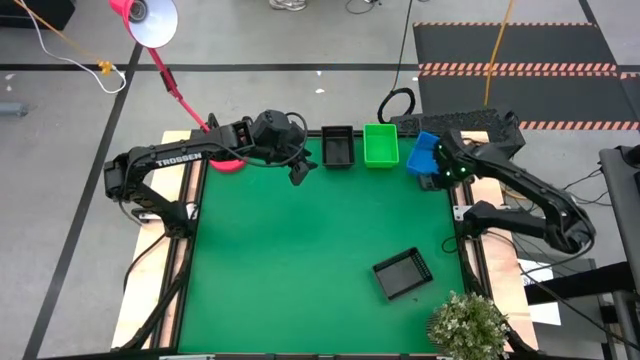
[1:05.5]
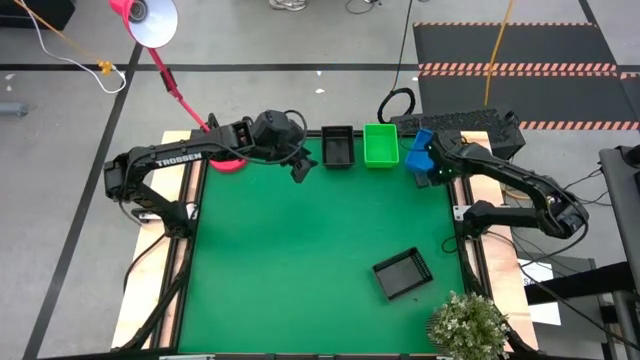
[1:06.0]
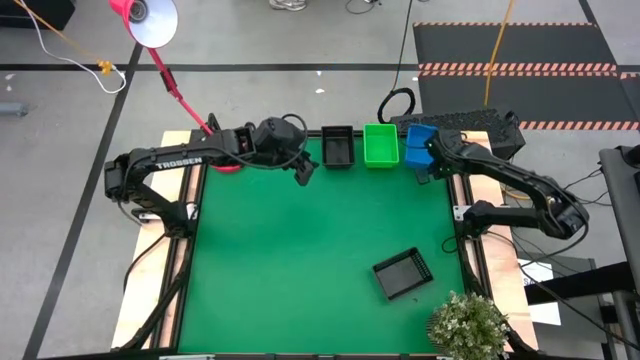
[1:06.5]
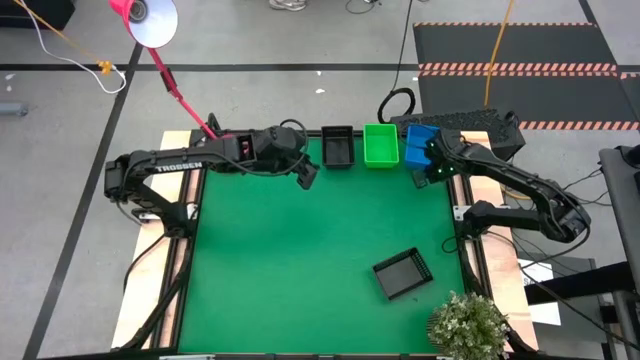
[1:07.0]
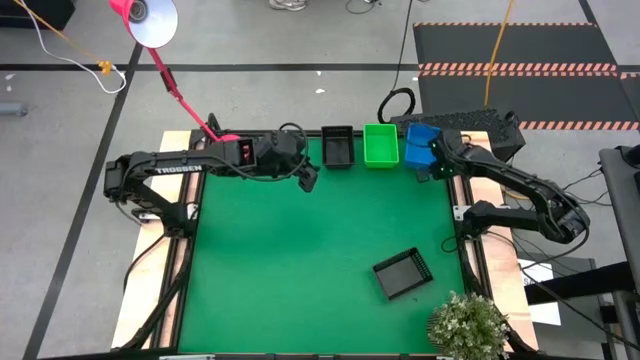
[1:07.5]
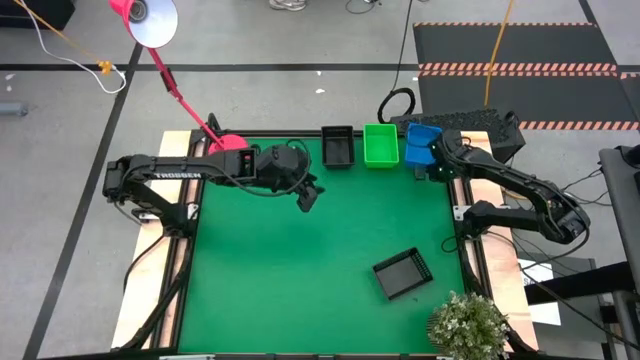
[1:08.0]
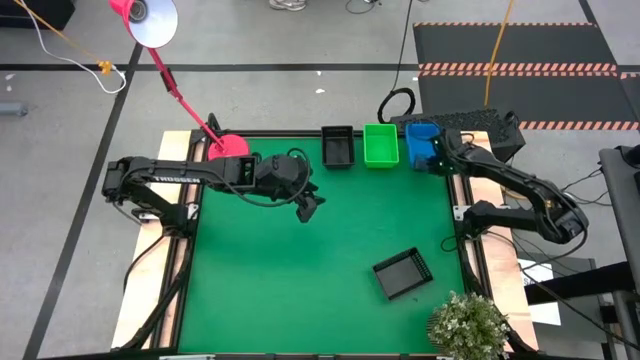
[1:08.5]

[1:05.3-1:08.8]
Adjust the stacked blue bins

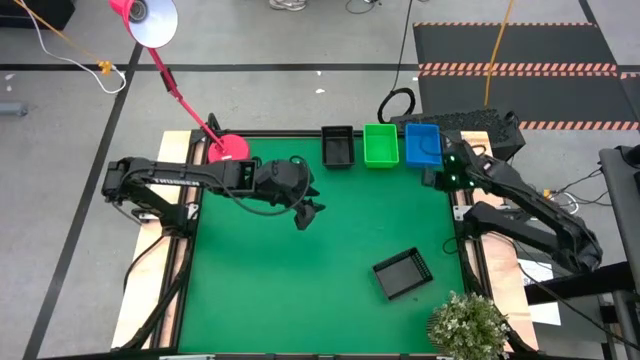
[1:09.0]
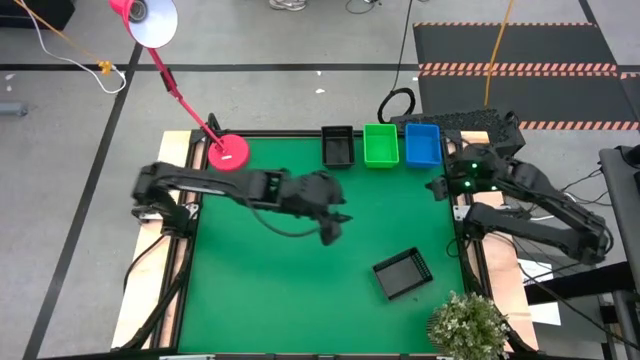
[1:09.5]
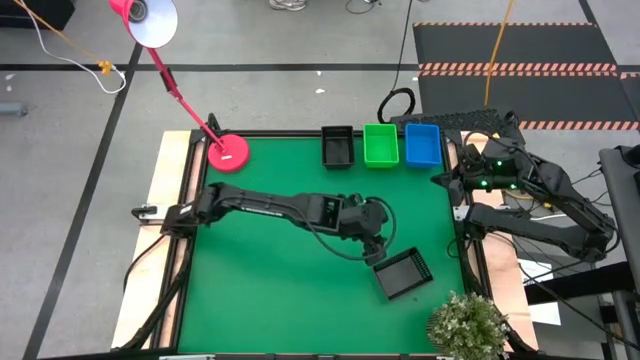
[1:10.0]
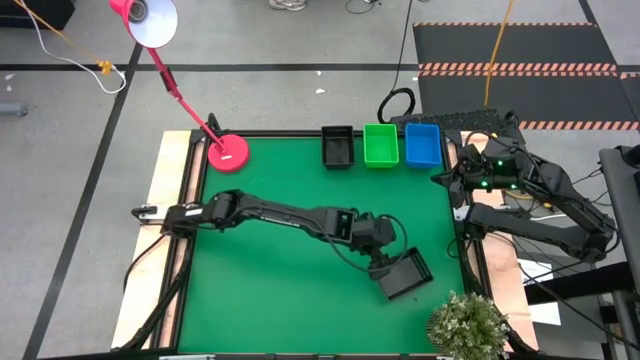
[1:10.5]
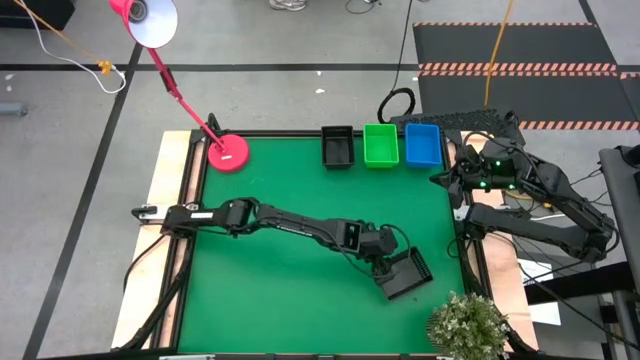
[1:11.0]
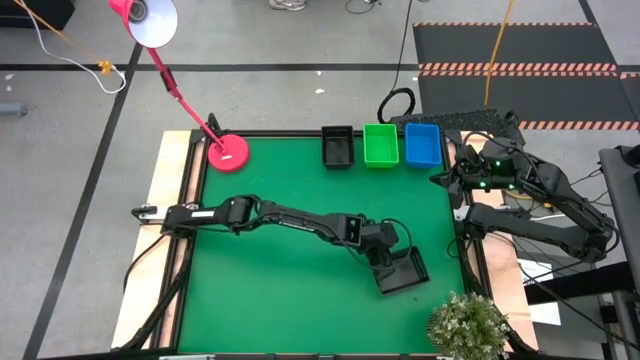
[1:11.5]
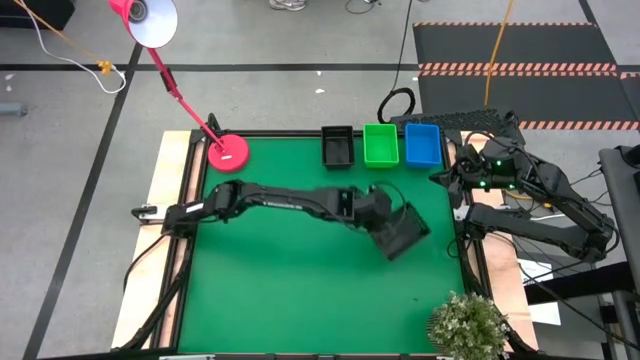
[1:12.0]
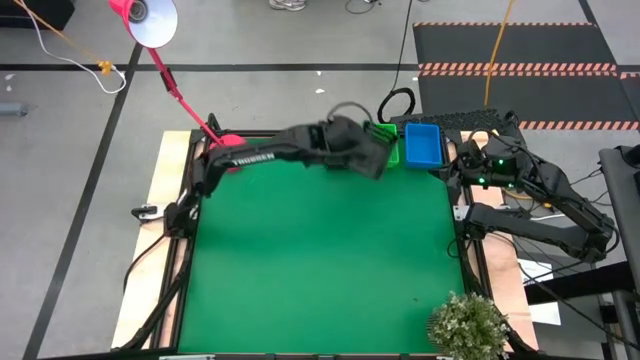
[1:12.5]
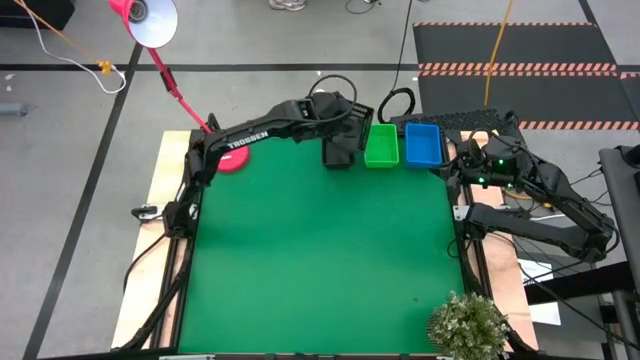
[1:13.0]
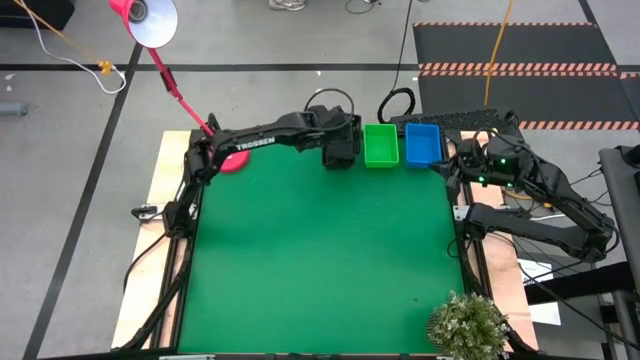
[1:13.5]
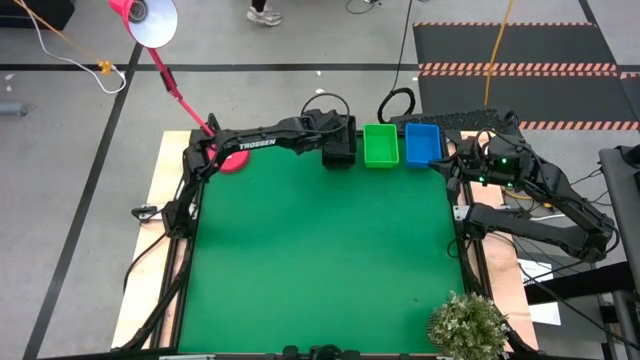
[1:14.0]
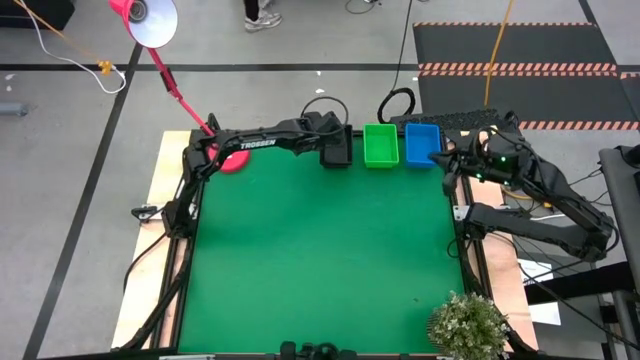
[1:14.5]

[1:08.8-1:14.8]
Stack the black bin on the stacked black bin

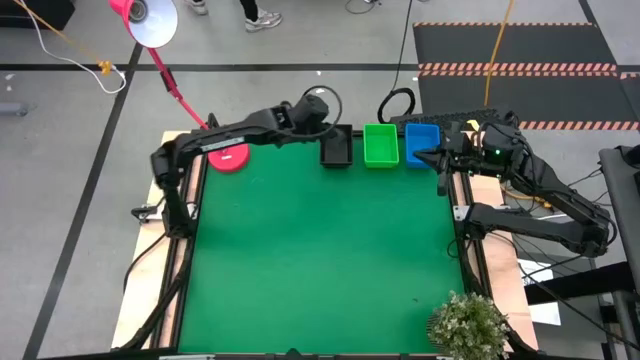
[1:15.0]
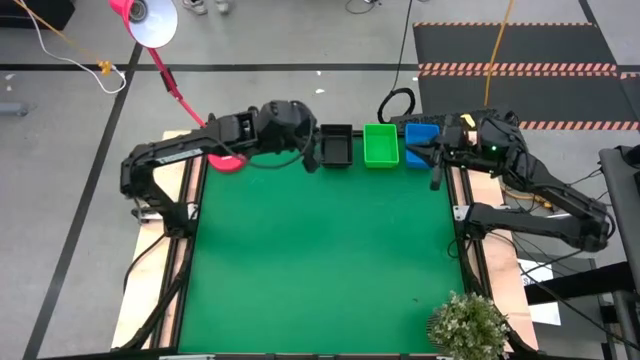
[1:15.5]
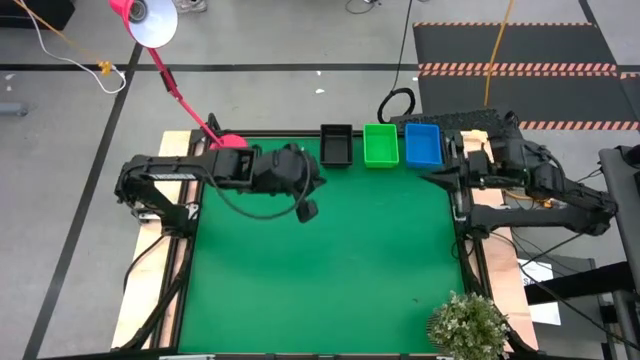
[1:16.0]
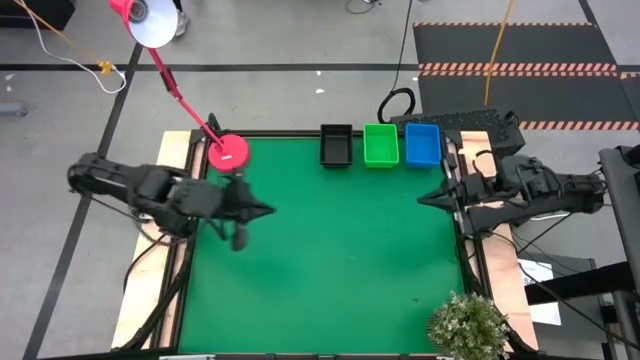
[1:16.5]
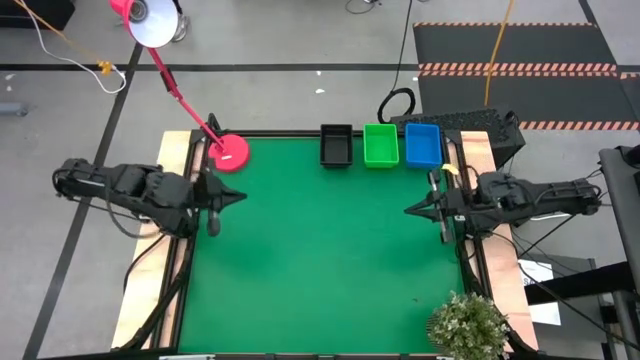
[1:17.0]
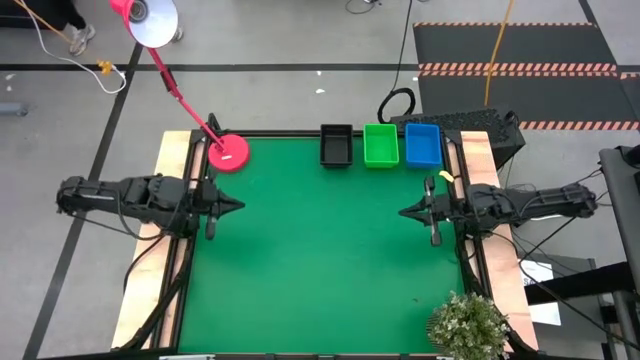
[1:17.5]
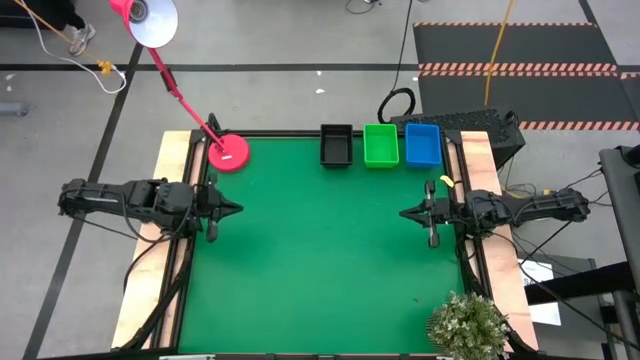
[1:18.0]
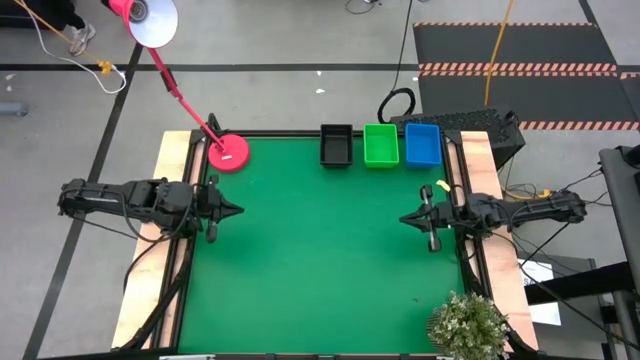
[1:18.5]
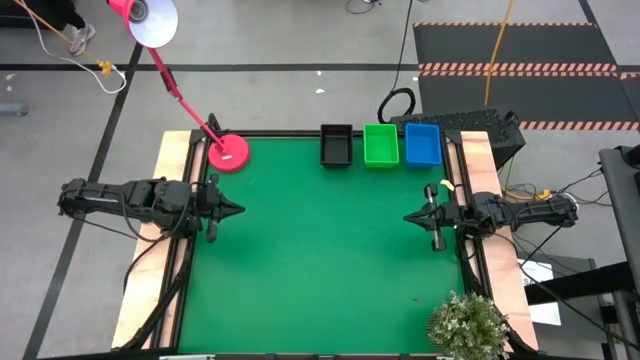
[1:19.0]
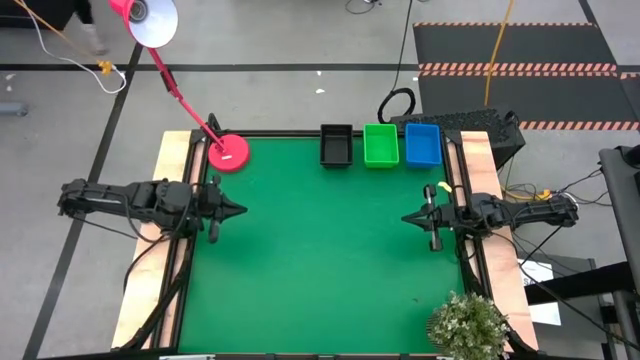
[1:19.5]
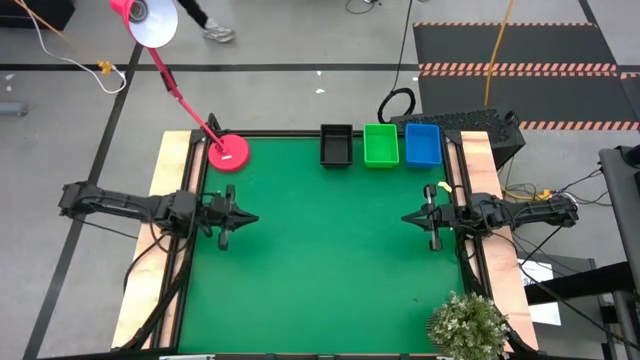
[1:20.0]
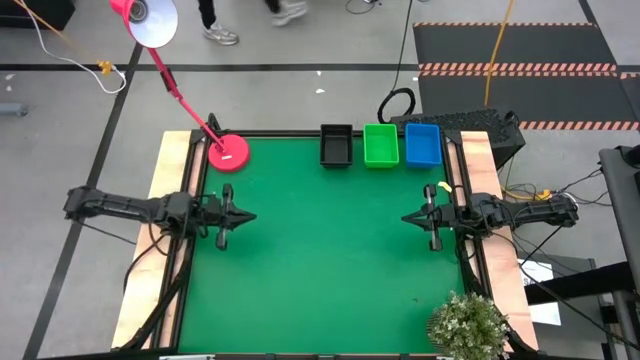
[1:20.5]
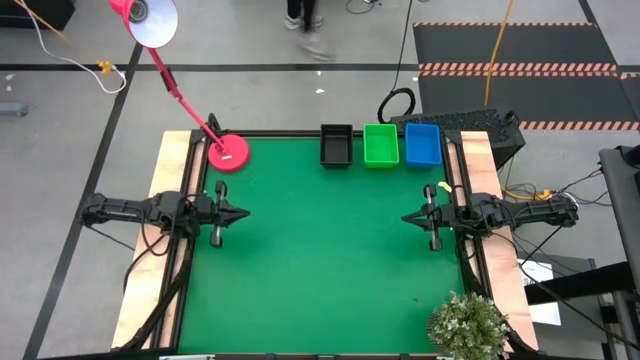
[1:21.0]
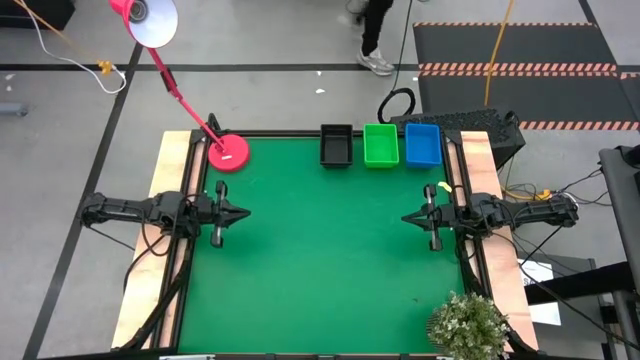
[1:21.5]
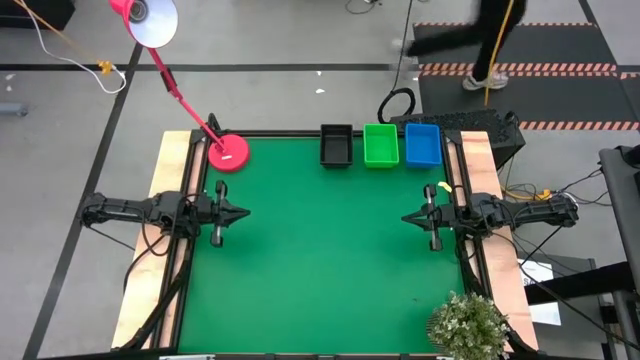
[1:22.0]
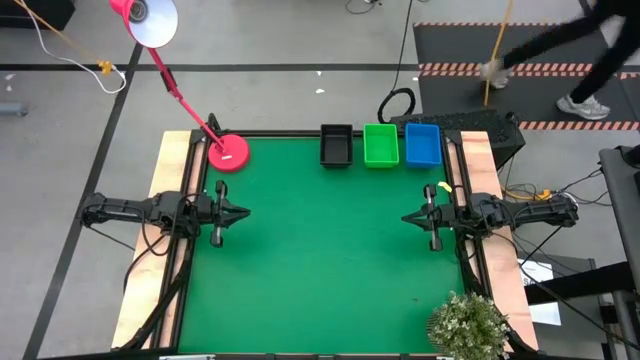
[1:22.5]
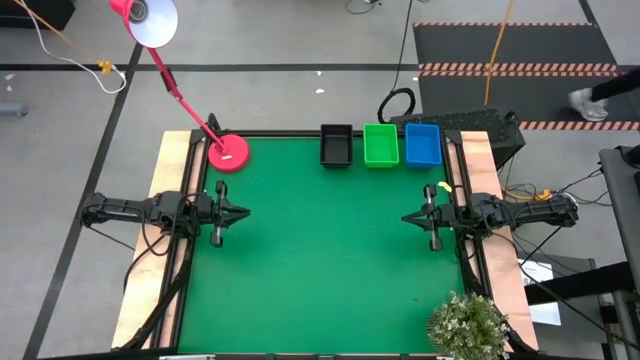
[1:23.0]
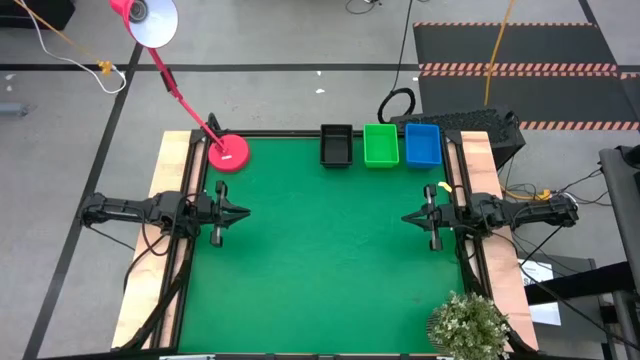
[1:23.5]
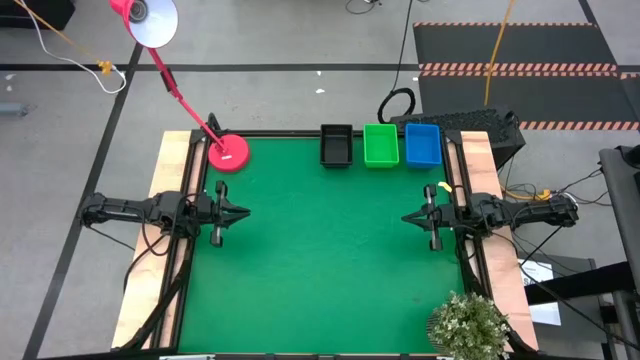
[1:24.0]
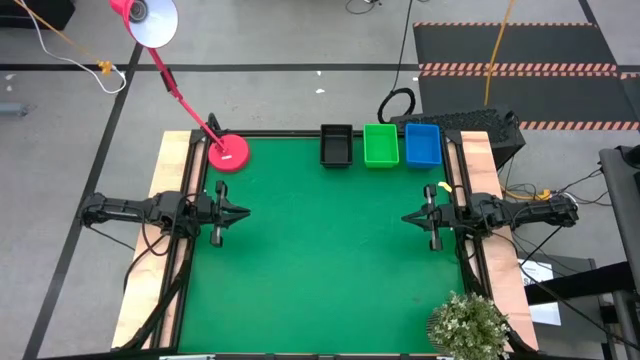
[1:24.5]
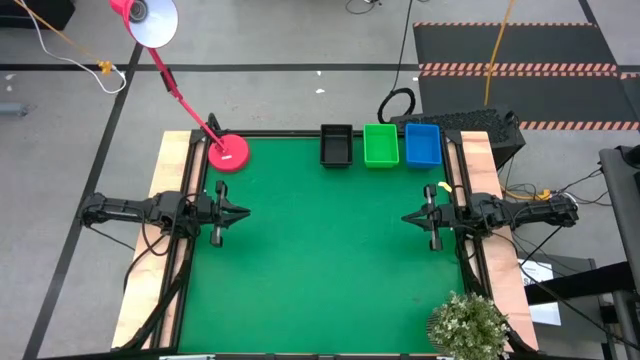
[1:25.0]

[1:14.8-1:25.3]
Return to Home Position
